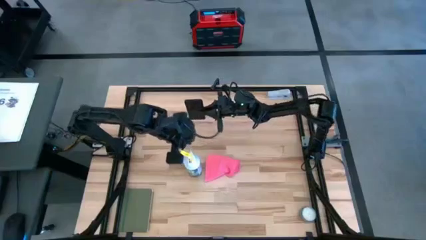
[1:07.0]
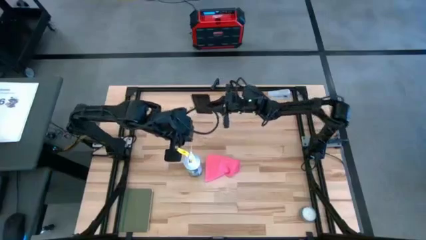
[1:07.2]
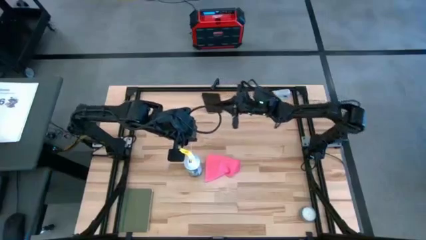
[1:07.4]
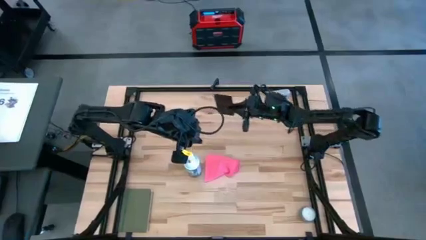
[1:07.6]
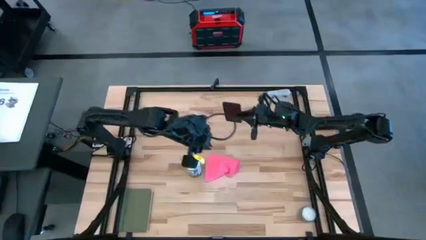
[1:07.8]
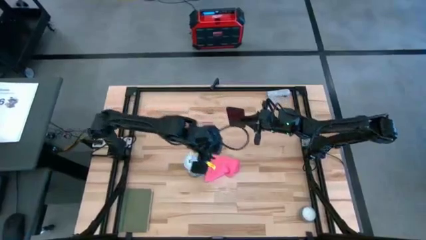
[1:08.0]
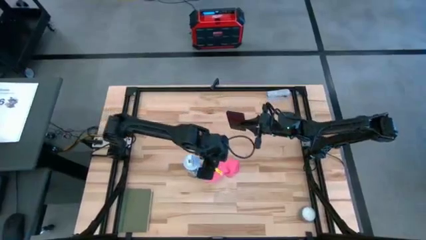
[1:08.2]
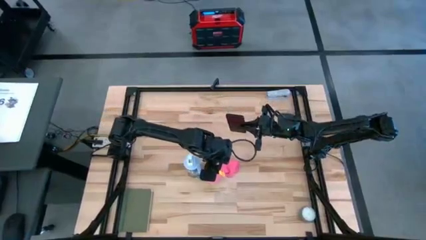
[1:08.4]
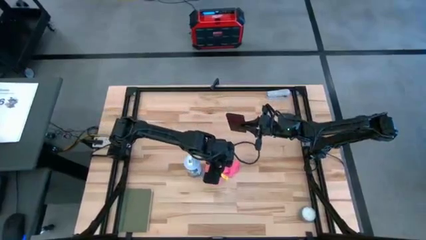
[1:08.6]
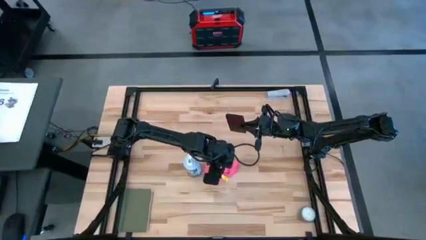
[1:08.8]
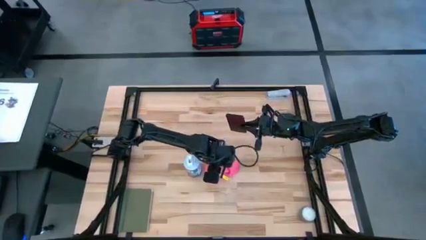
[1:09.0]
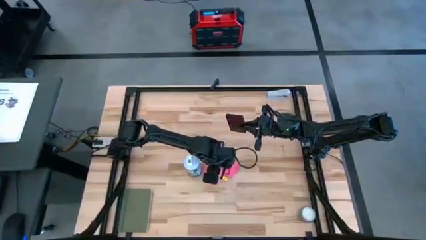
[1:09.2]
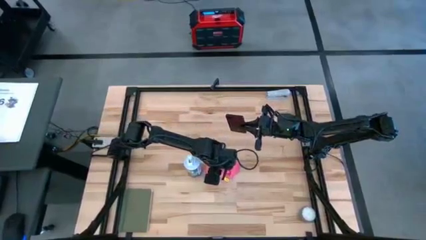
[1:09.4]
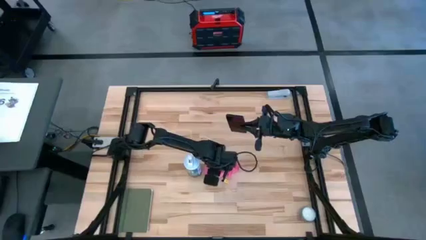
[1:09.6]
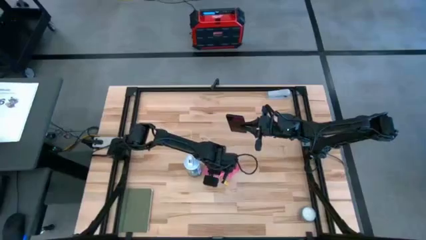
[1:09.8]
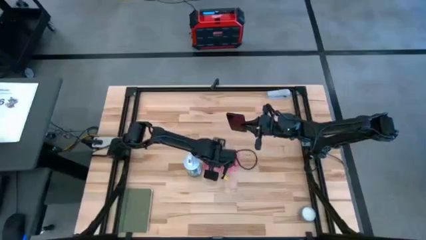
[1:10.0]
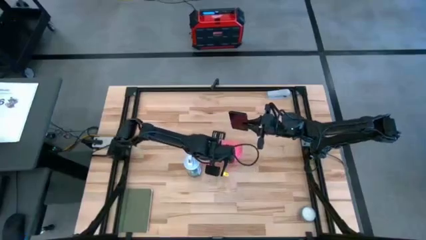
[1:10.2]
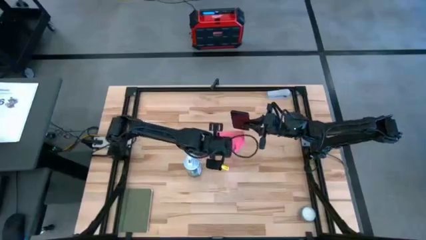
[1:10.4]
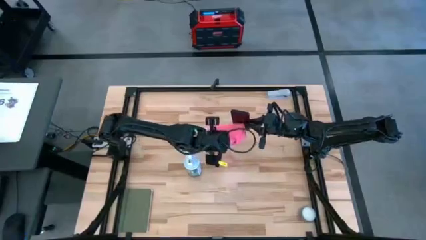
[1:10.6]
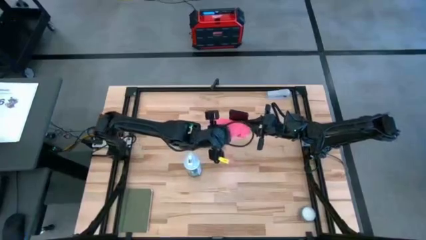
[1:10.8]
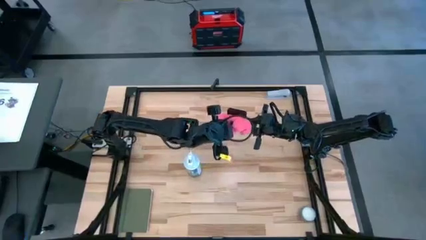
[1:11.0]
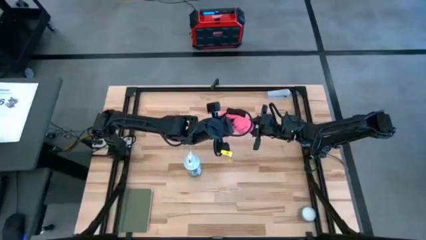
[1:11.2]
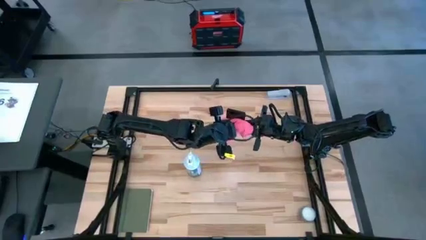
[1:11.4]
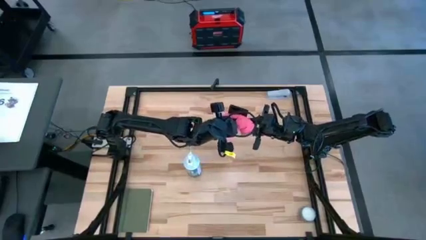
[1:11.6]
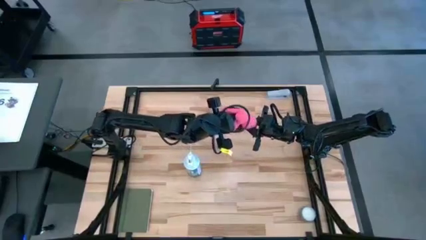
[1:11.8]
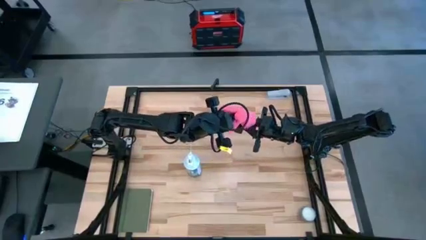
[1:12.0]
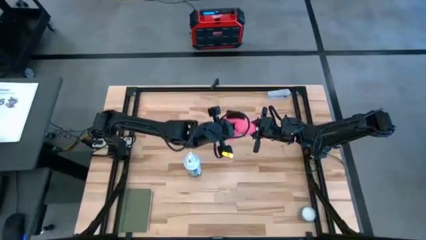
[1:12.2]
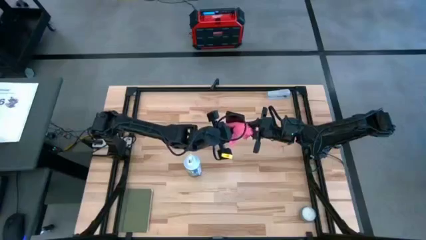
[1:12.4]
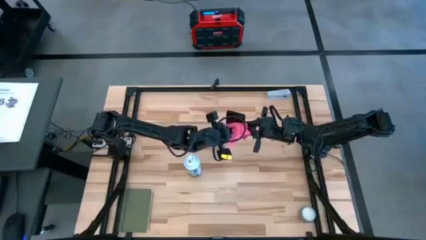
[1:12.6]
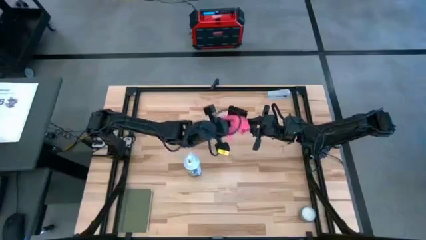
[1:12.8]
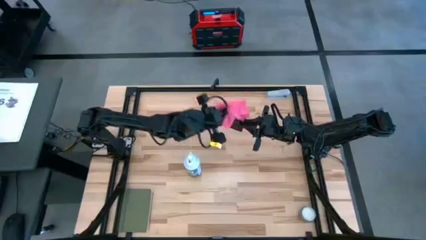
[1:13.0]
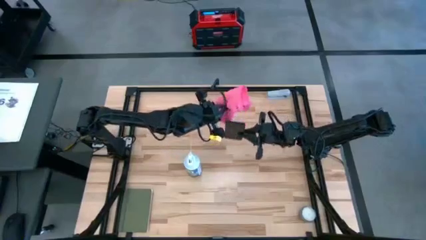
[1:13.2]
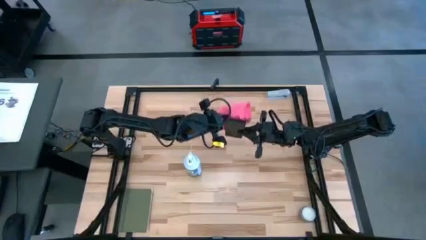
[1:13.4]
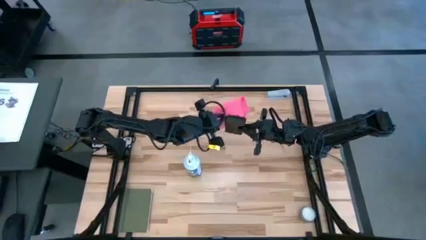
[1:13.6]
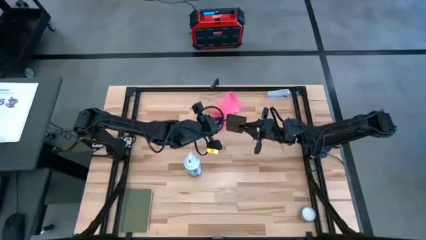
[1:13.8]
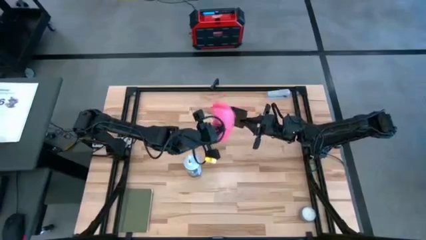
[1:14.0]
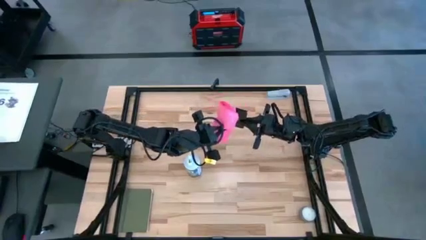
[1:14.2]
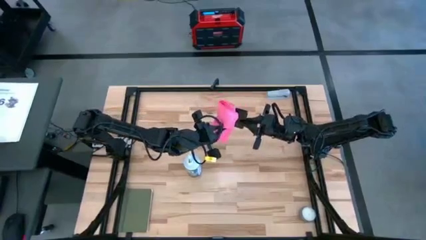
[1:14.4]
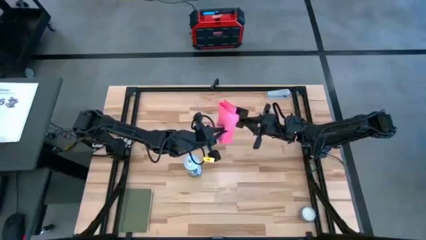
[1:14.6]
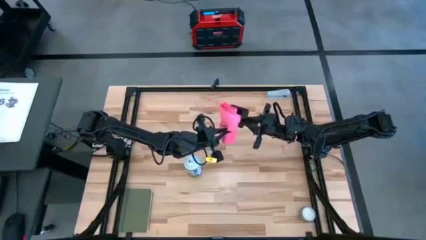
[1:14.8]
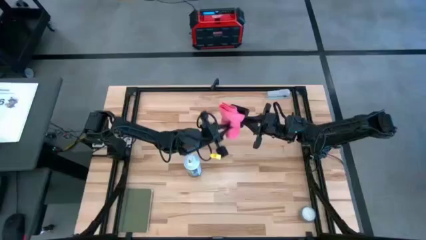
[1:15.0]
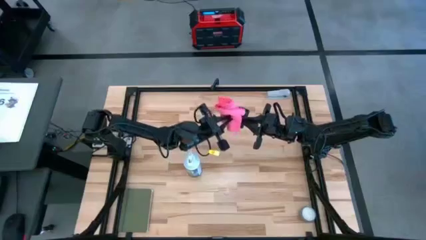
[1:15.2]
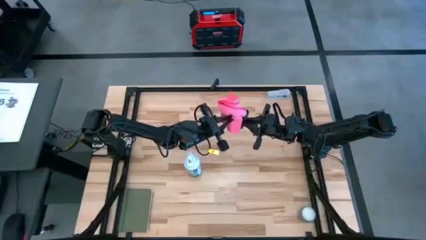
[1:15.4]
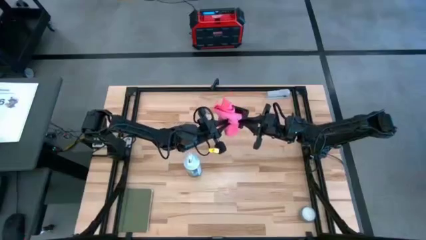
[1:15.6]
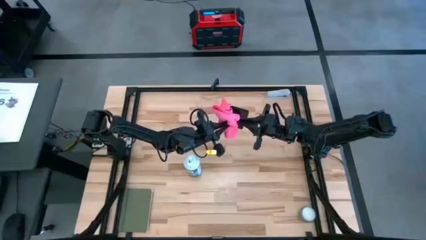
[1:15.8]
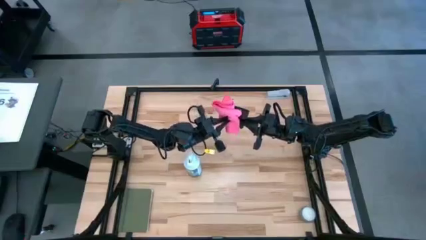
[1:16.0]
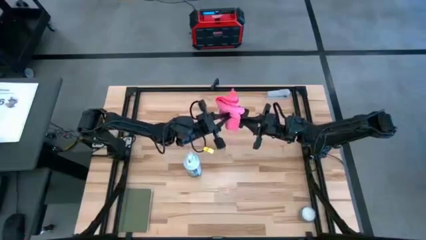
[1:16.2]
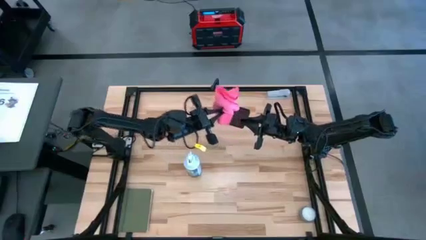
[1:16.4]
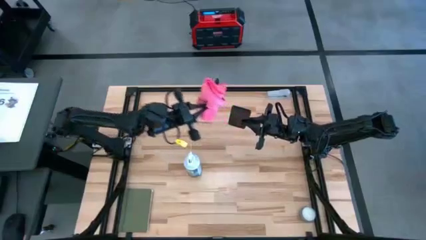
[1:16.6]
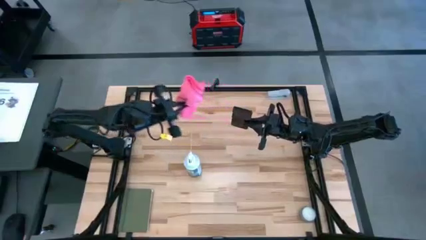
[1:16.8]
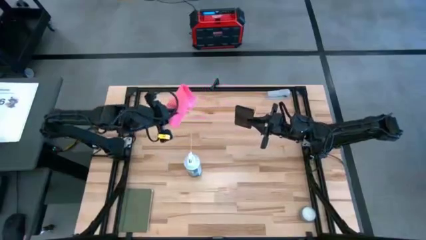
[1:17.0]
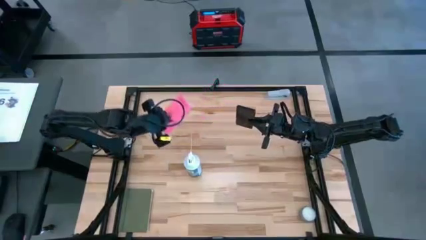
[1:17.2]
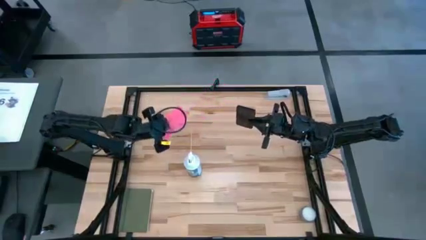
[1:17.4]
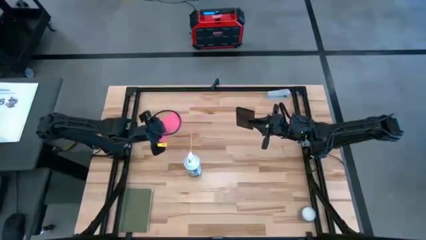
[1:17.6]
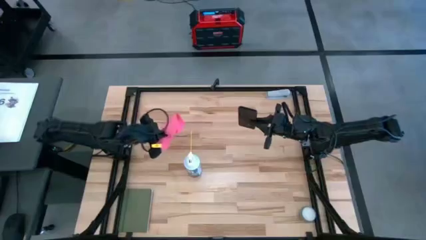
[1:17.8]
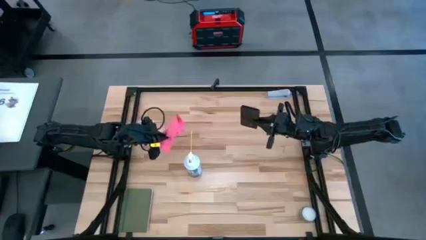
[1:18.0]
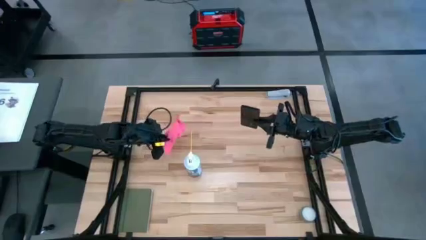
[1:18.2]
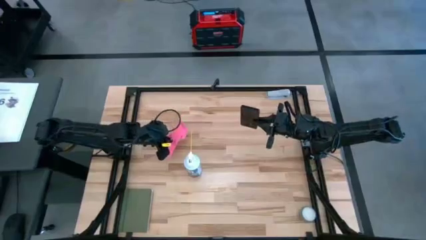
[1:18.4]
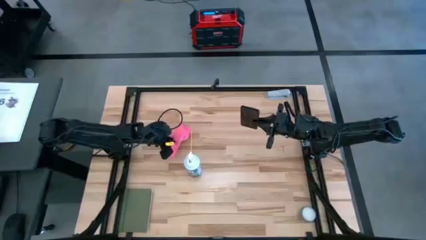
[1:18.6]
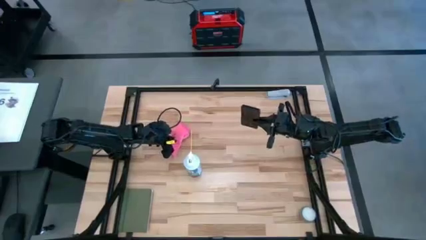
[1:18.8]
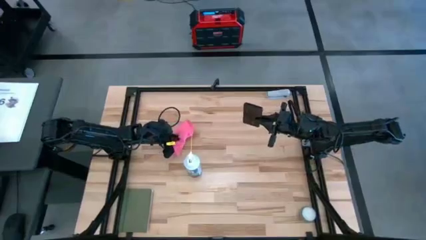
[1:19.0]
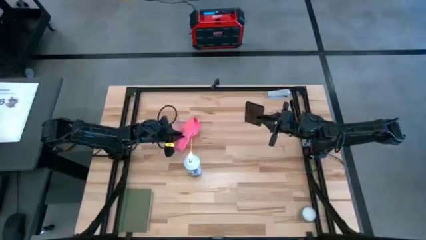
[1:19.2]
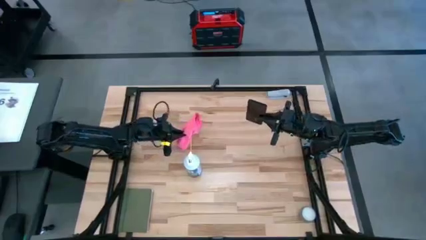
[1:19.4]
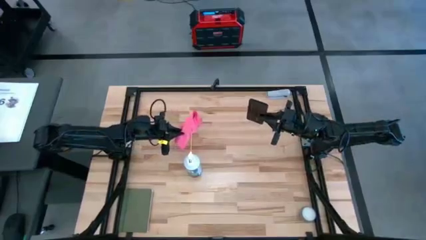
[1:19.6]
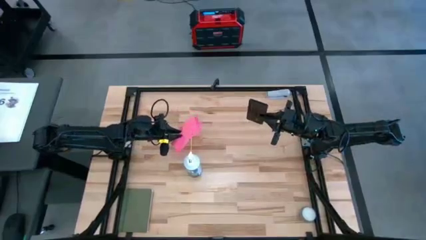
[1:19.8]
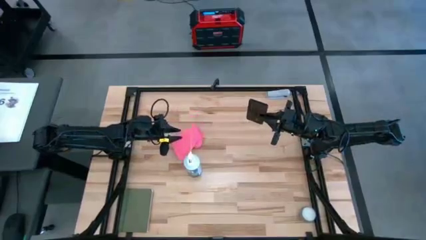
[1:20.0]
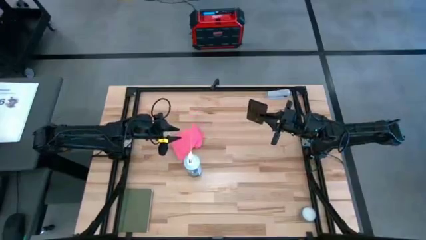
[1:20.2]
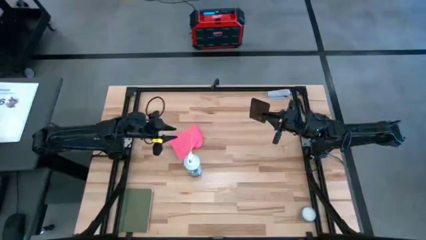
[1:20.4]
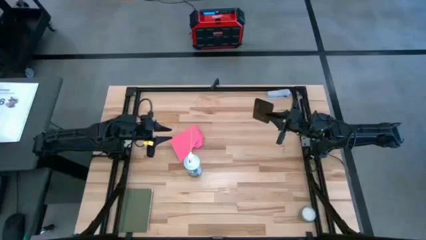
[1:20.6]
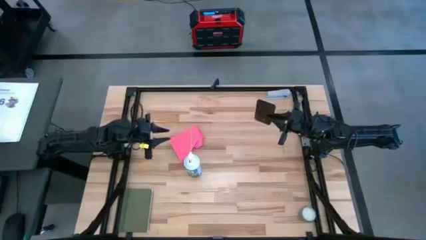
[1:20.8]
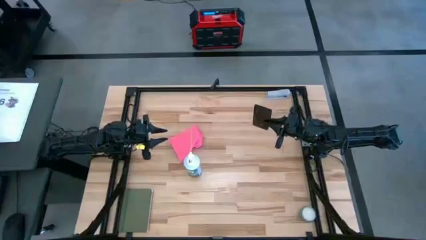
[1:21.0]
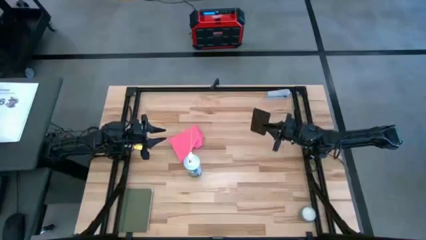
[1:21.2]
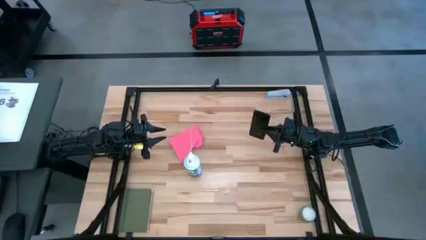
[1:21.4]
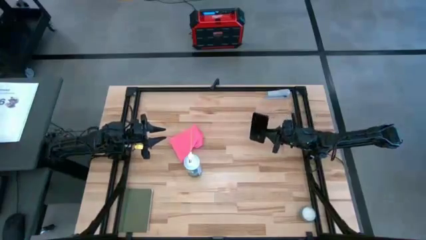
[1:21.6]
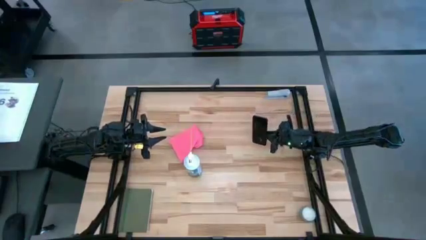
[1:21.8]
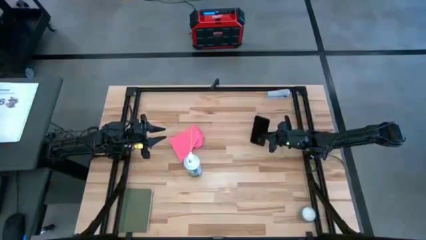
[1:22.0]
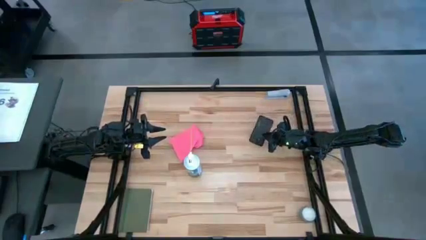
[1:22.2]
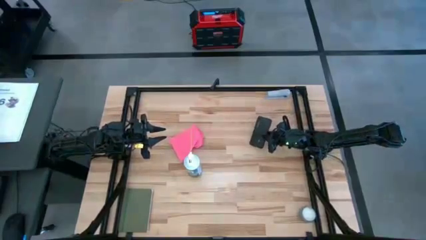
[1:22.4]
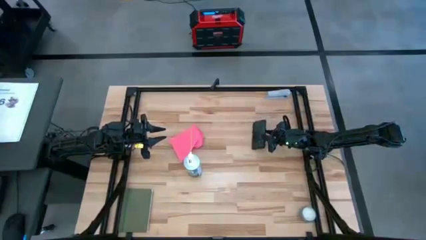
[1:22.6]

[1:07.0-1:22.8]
Task: Apply microfiber cloth
Wipe the back of the cellphone with the pink microfiber cloth
